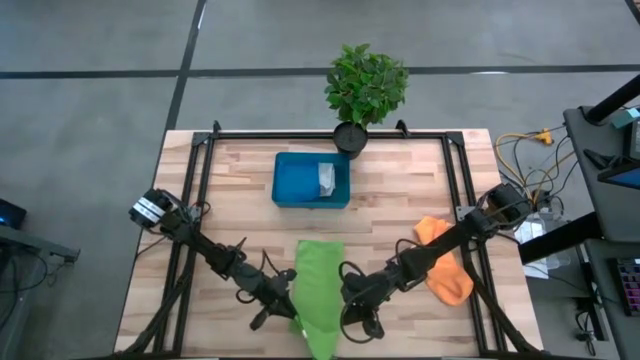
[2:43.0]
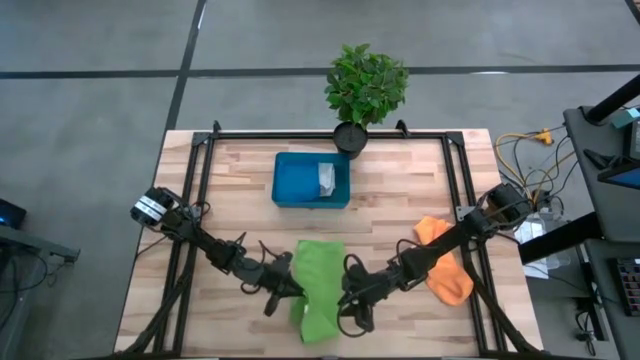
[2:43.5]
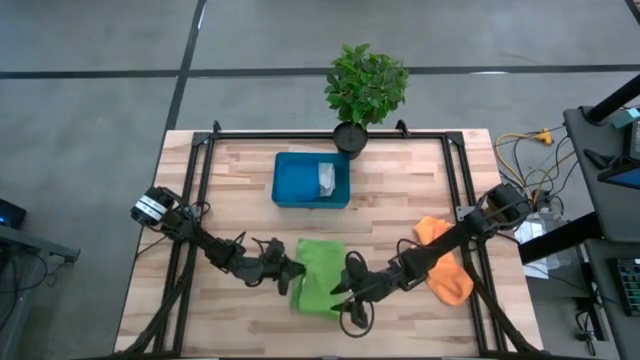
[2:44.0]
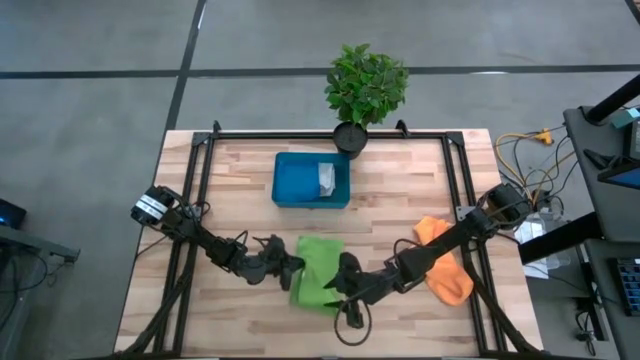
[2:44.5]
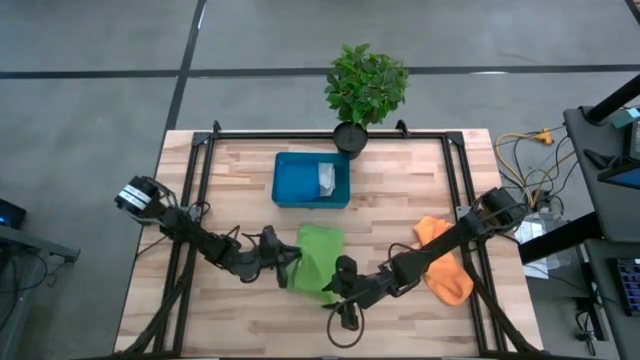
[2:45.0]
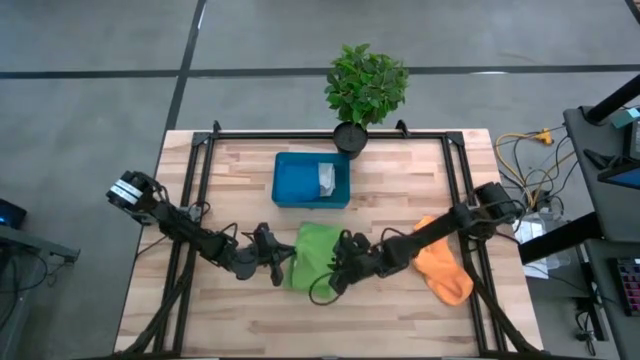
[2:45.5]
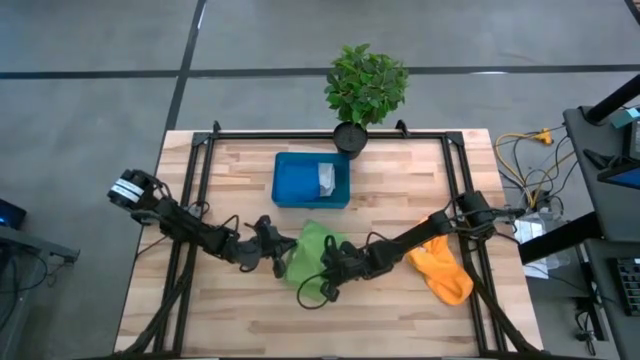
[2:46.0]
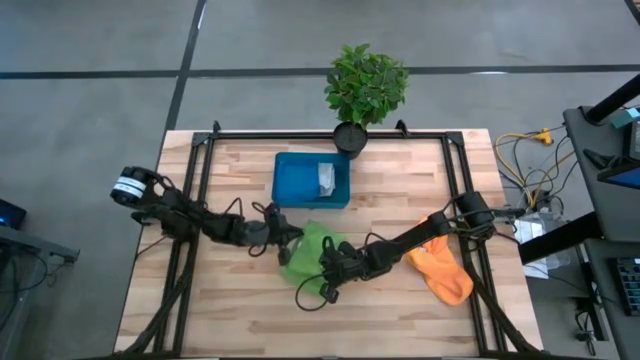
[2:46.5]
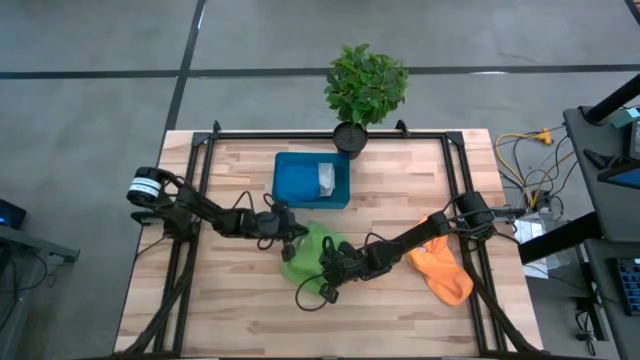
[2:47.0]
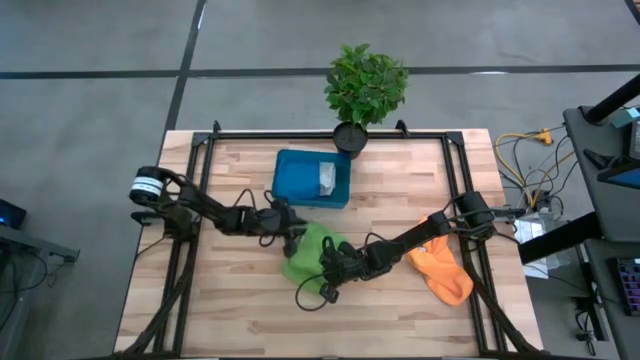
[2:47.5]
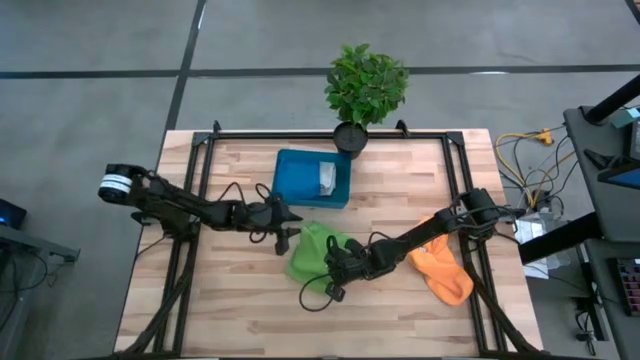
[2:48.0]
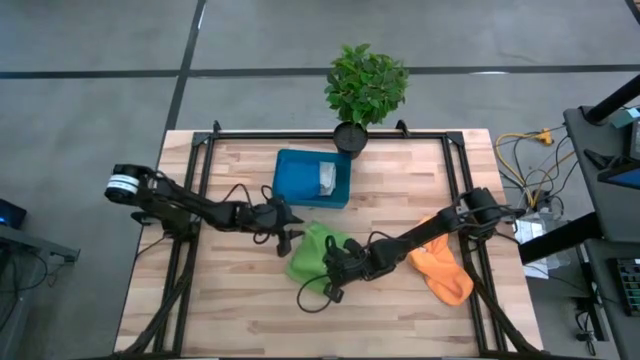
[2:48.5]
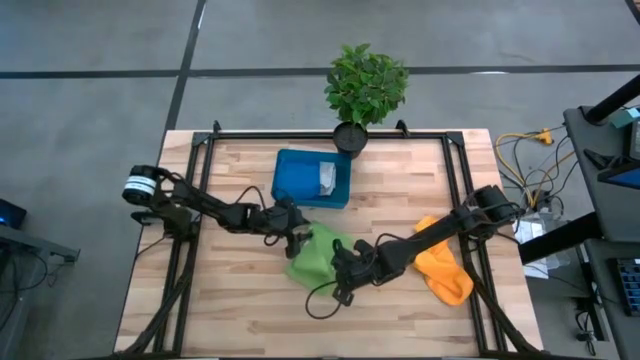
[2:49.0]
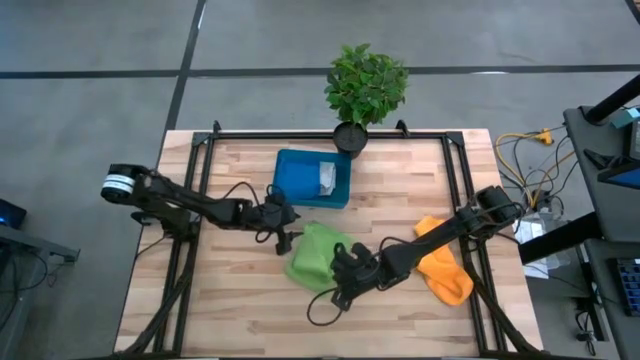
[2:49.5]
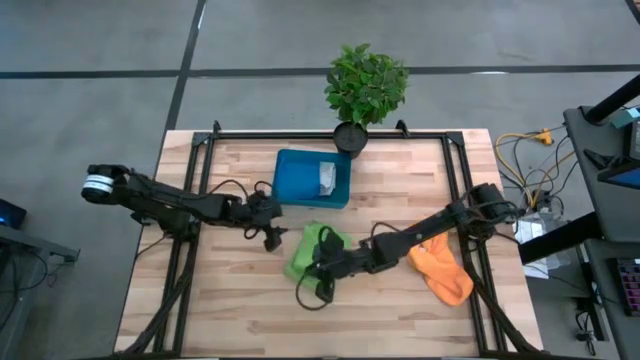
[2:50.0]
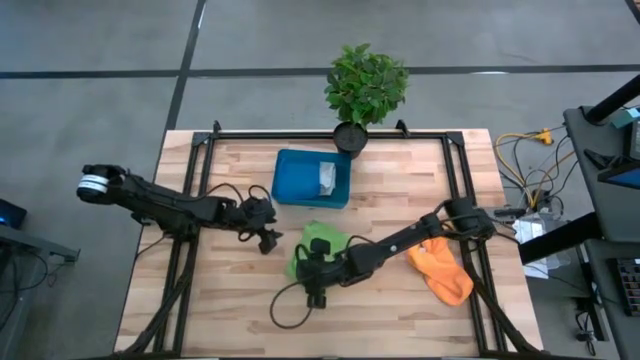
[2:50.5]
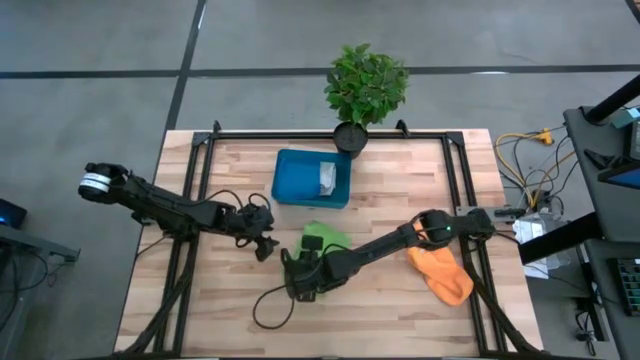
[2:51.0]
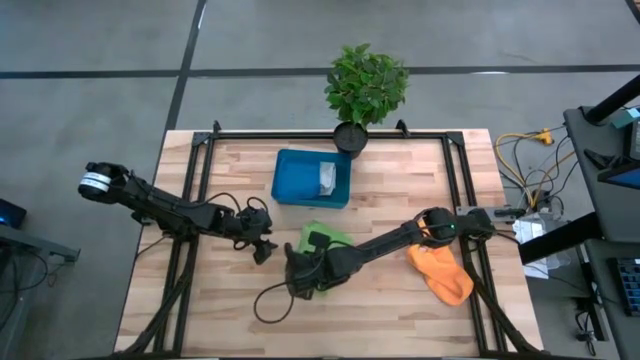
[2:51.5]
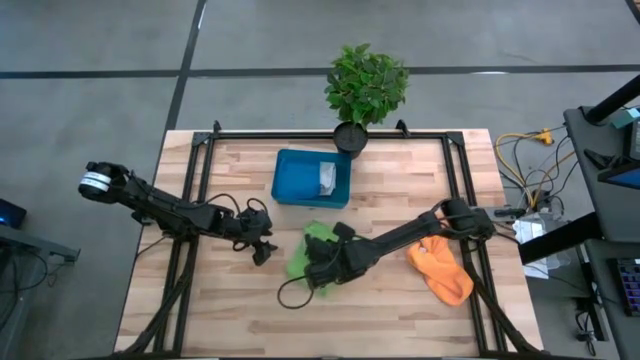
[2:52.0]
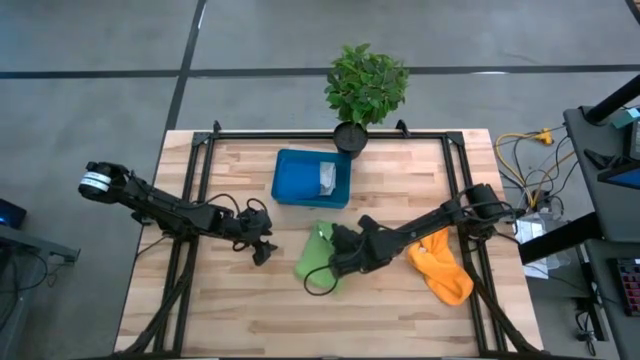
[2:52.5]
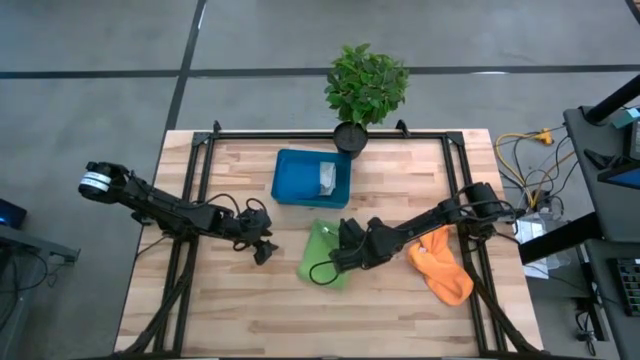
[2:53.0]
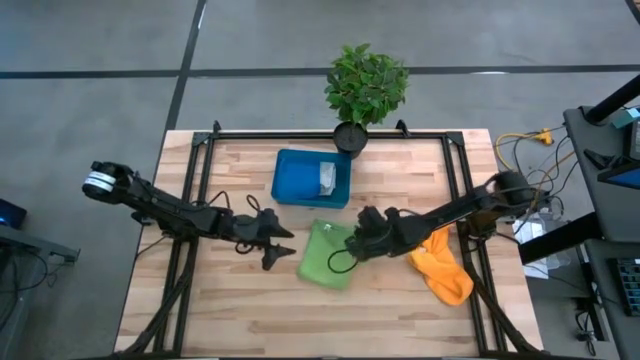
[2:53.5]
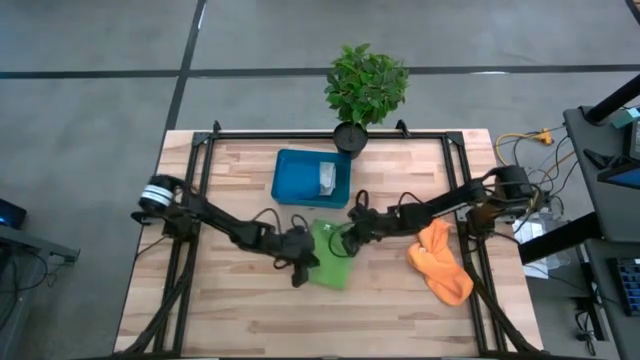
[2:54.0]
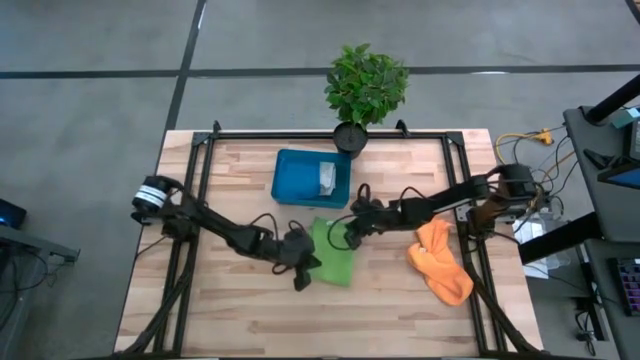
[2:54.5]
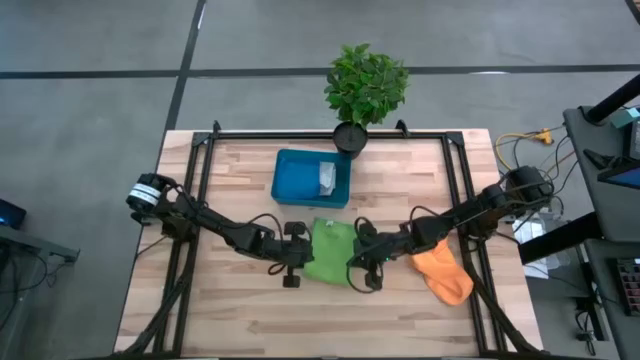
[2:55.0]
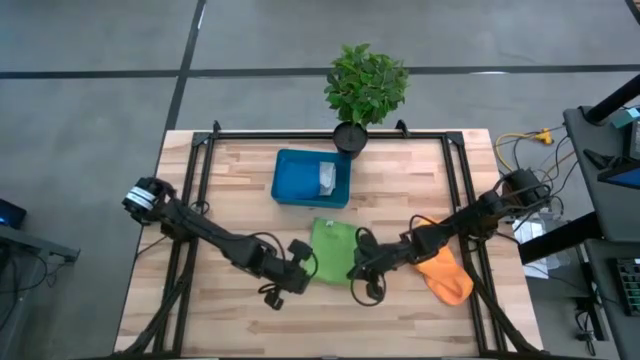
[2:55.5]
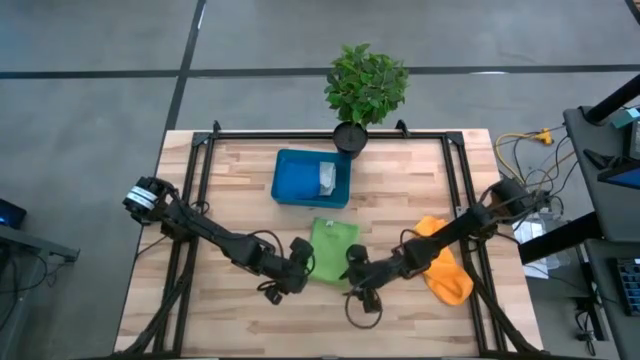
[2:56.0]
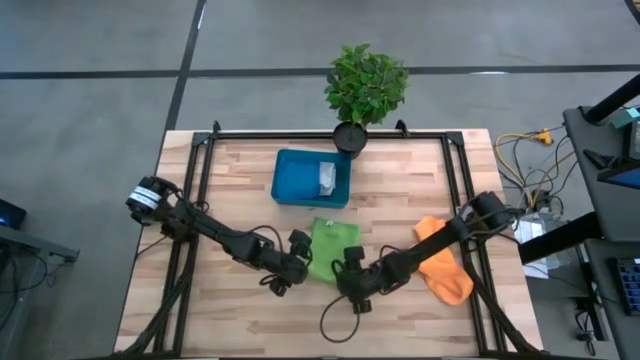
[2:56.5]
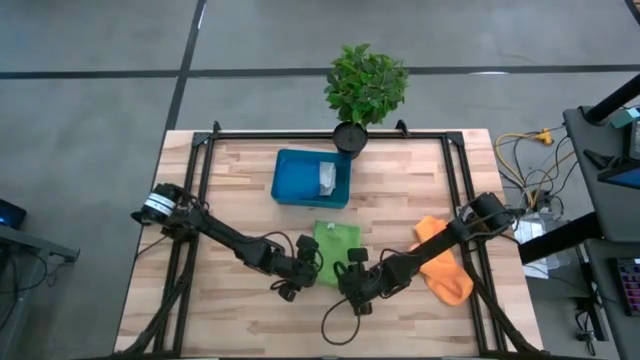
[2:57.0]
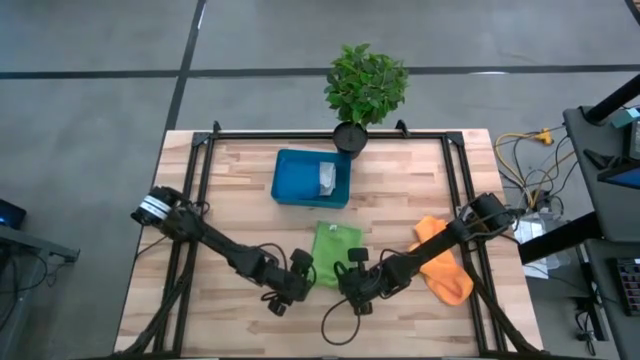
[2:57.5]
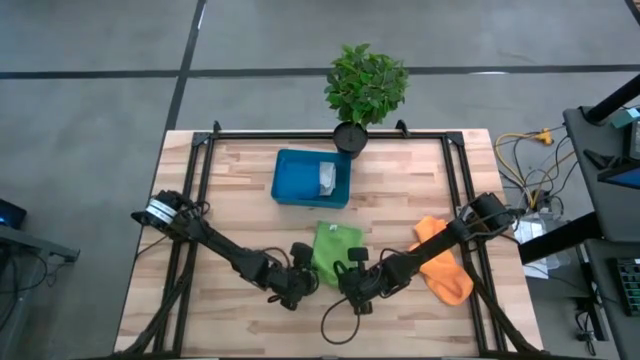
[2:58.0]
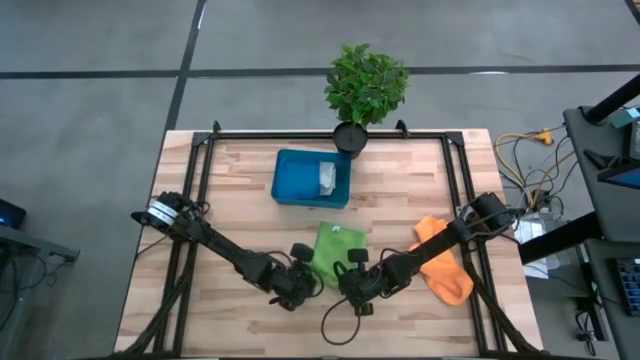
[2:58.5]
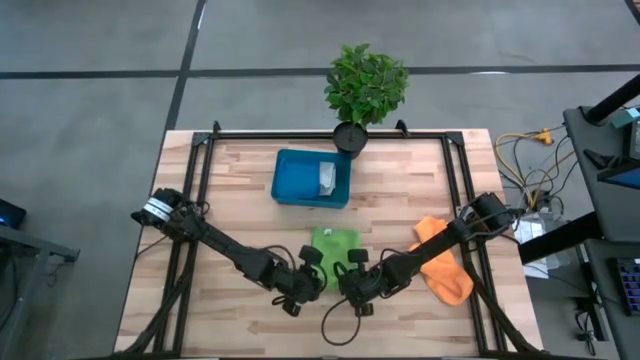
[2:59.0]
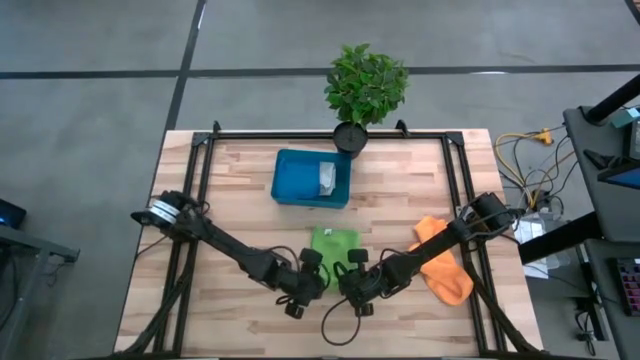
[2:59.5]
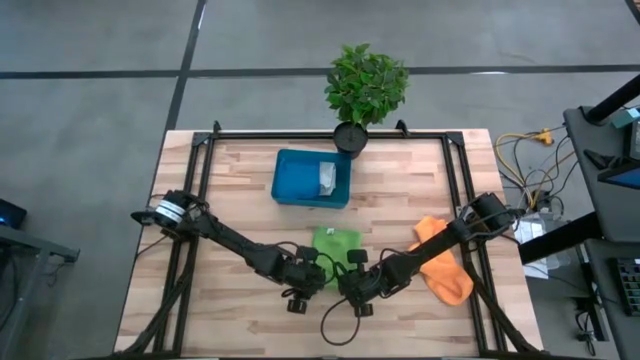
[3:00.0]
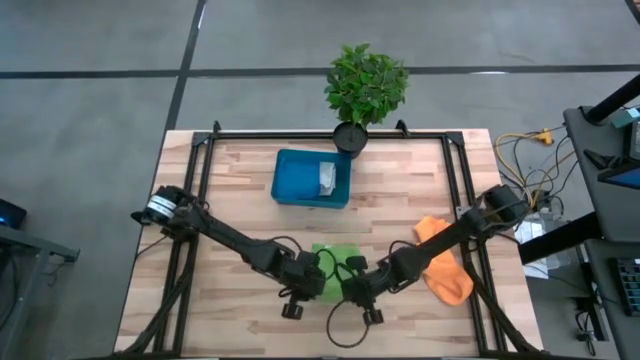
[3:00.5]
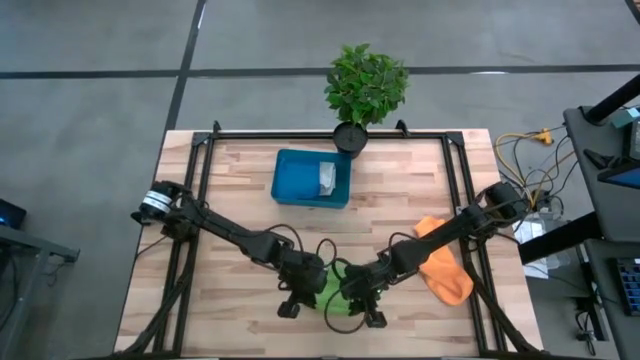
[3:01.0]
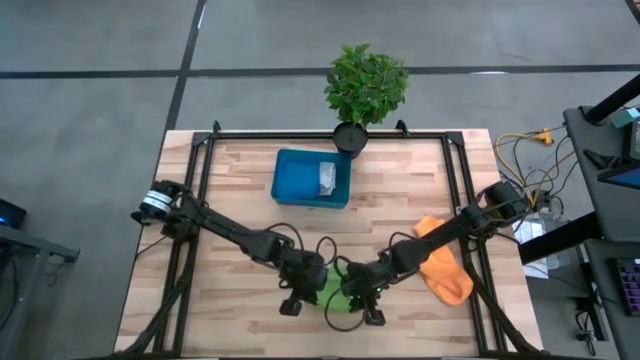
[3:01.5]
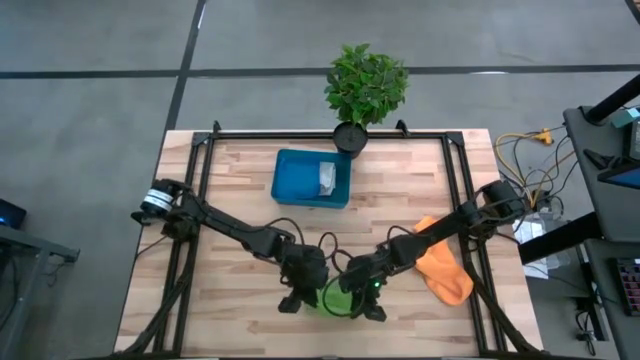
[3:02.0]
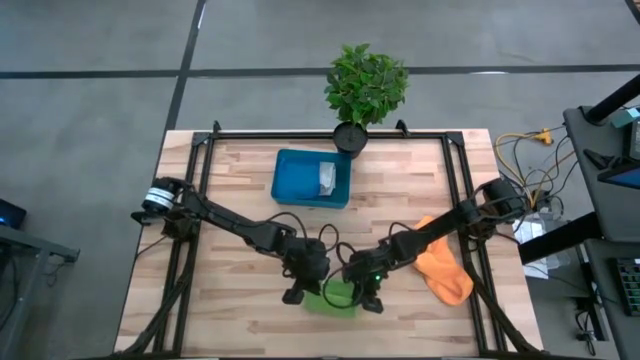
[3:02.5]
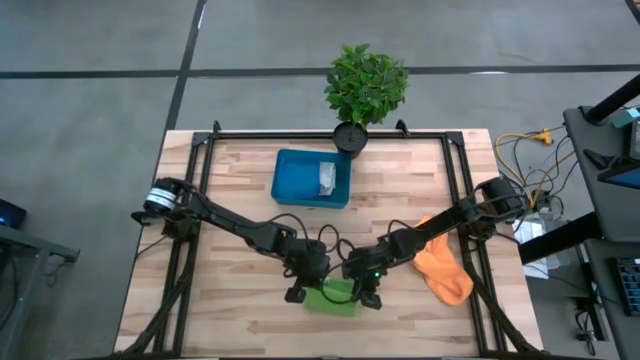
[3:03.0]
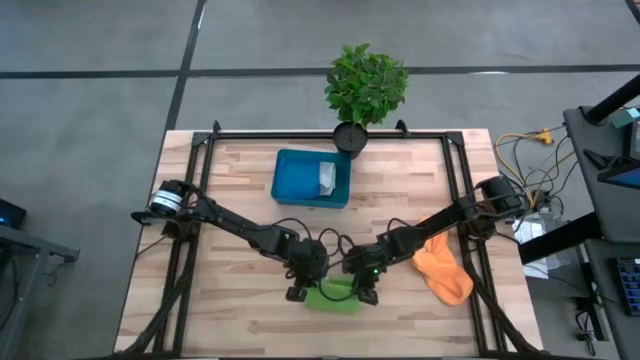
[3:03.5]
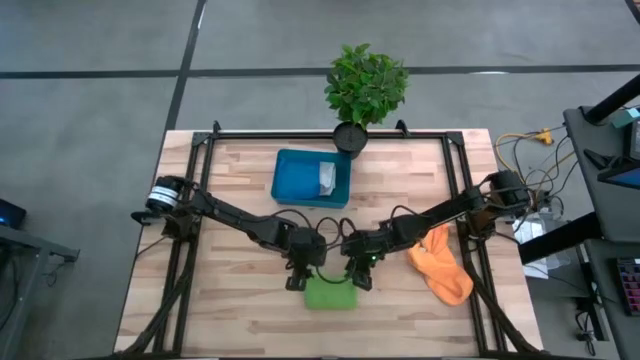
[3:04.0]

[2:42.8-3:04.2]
Task: Fold microfiber towels
Fold the green microfiber towel
